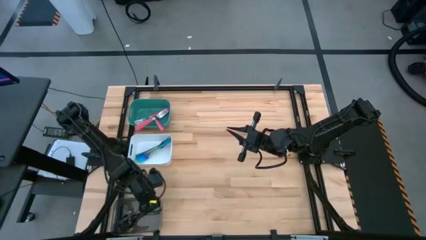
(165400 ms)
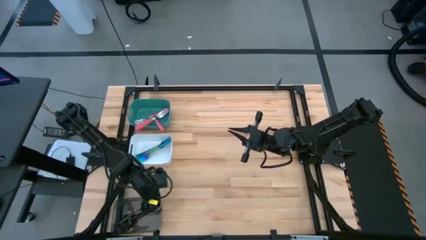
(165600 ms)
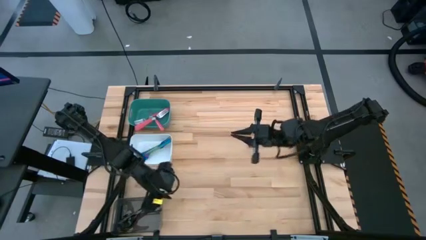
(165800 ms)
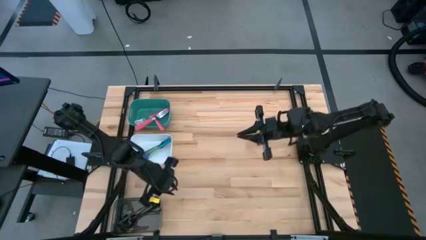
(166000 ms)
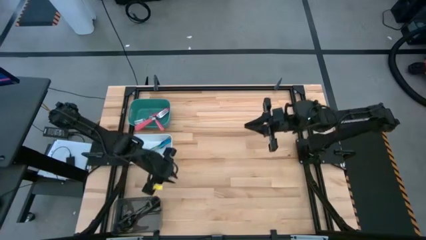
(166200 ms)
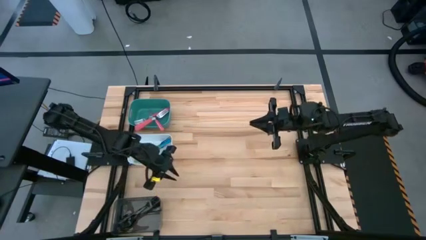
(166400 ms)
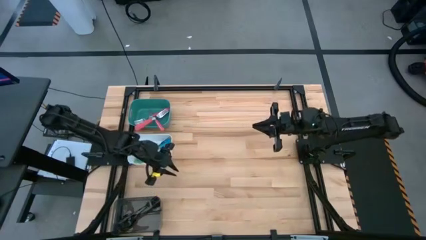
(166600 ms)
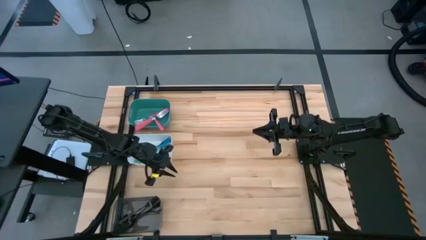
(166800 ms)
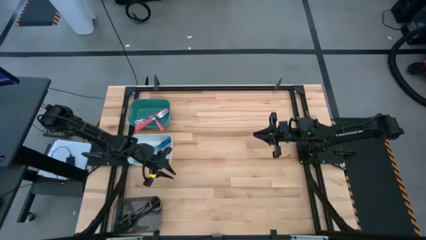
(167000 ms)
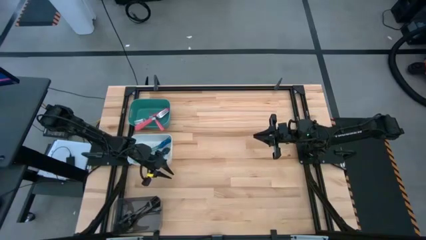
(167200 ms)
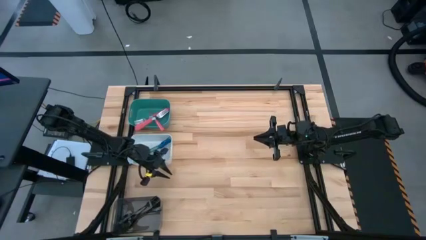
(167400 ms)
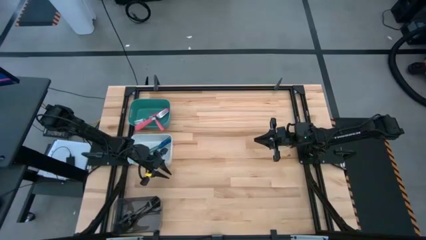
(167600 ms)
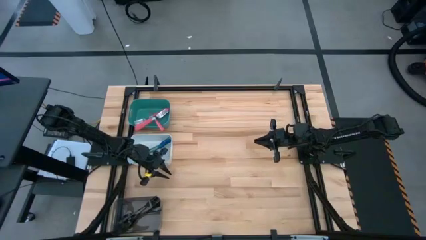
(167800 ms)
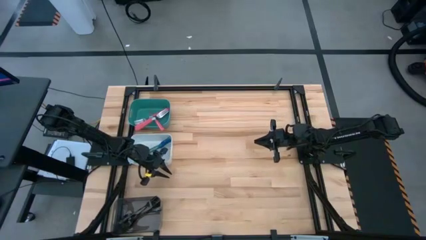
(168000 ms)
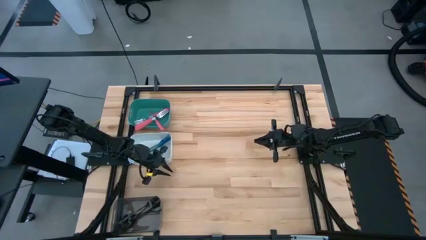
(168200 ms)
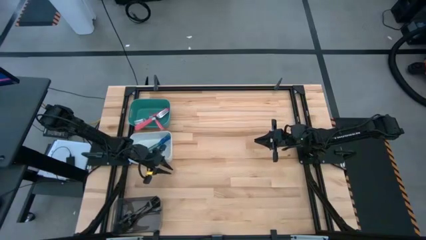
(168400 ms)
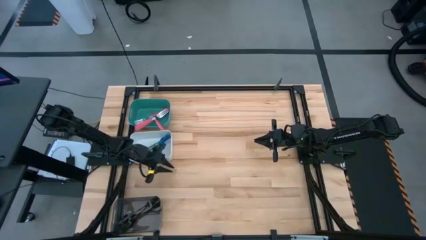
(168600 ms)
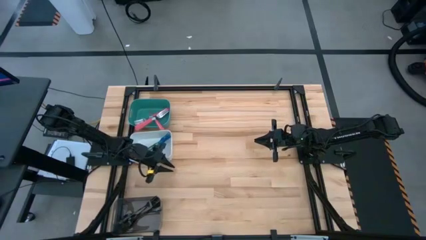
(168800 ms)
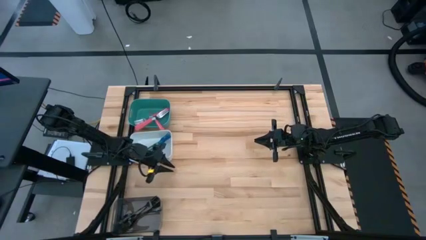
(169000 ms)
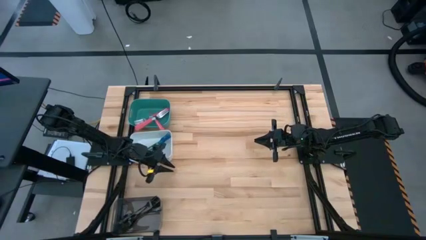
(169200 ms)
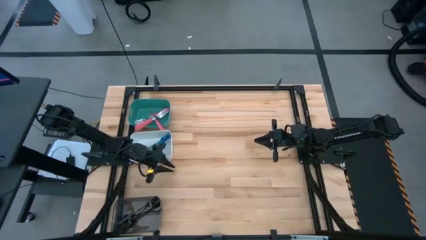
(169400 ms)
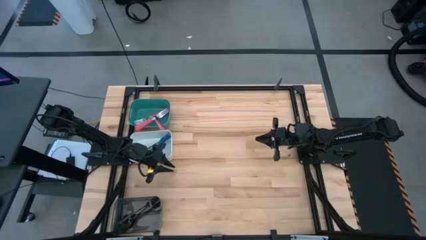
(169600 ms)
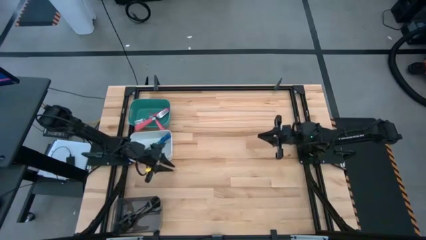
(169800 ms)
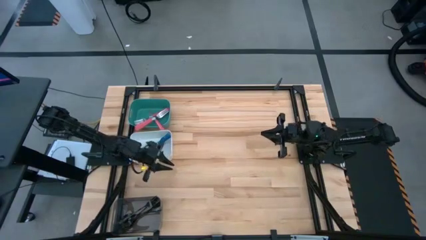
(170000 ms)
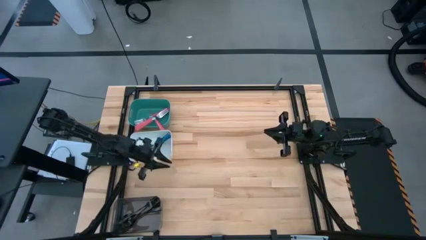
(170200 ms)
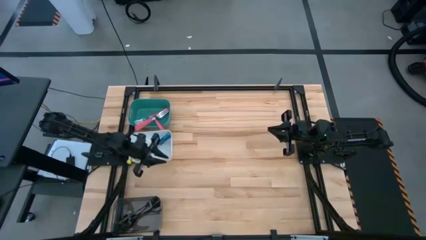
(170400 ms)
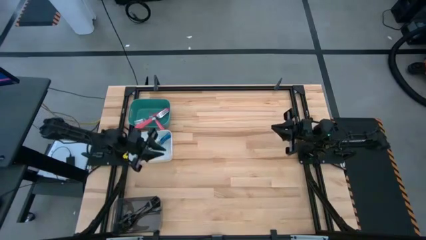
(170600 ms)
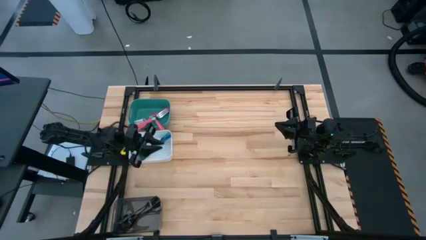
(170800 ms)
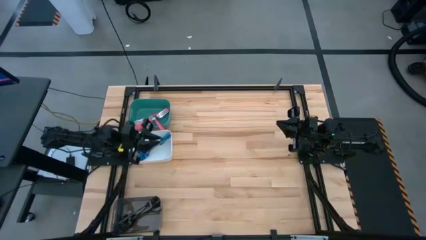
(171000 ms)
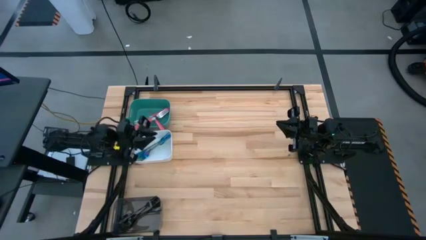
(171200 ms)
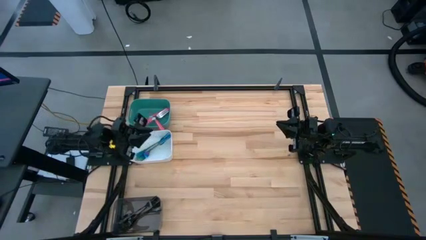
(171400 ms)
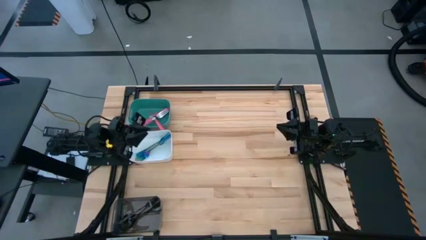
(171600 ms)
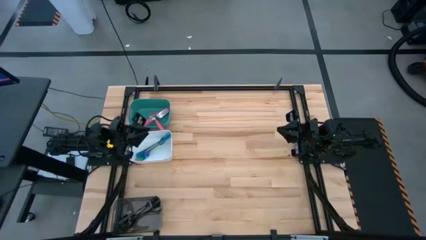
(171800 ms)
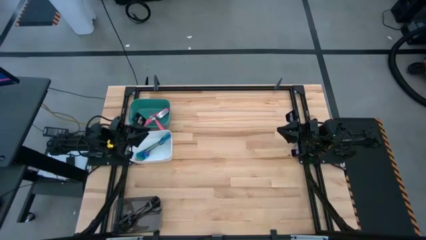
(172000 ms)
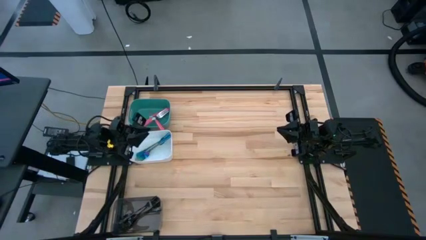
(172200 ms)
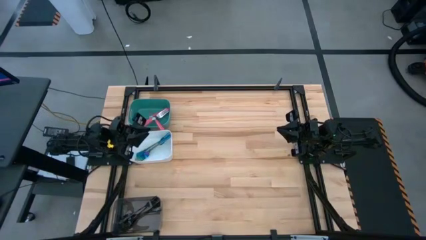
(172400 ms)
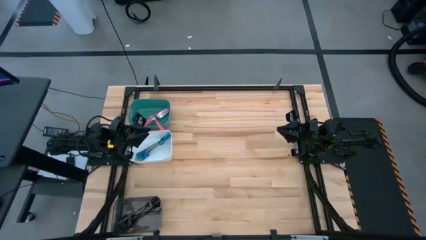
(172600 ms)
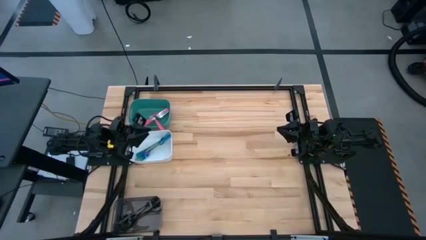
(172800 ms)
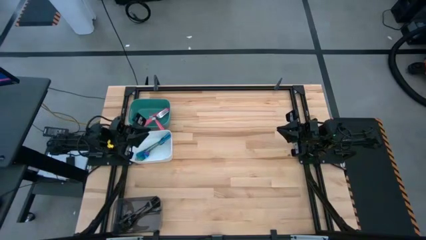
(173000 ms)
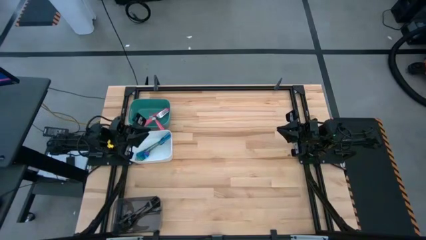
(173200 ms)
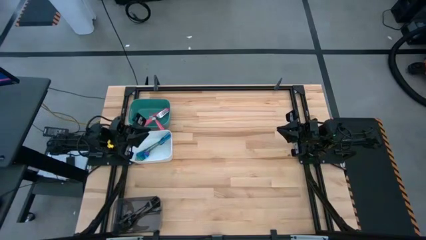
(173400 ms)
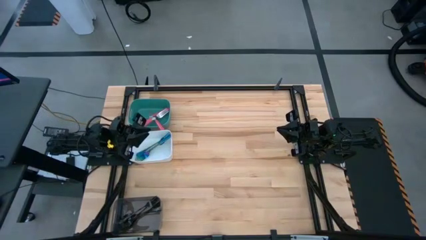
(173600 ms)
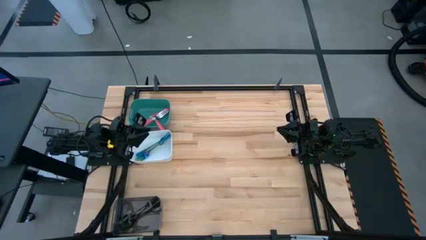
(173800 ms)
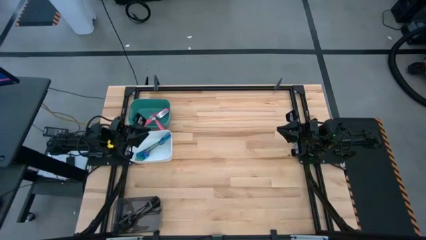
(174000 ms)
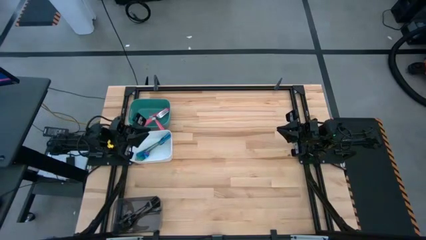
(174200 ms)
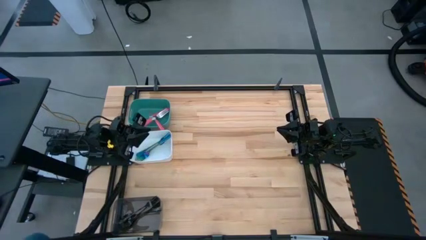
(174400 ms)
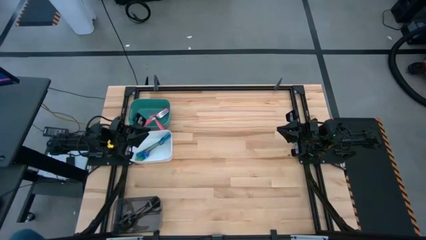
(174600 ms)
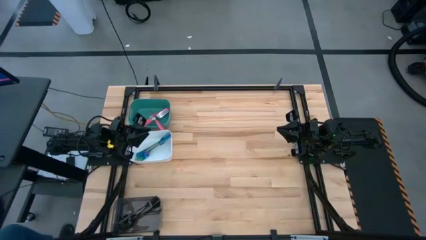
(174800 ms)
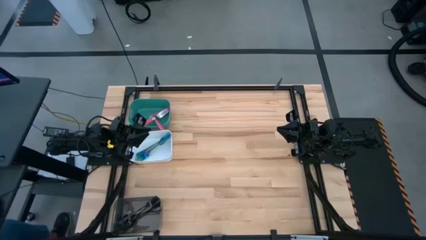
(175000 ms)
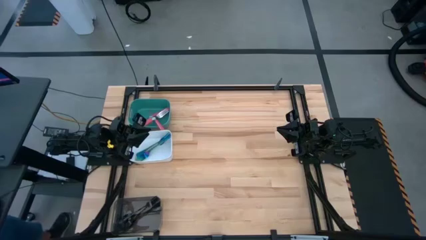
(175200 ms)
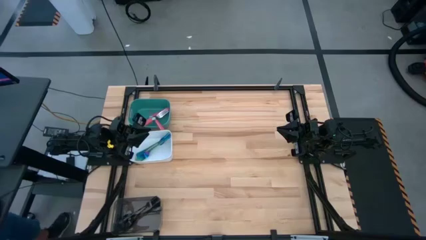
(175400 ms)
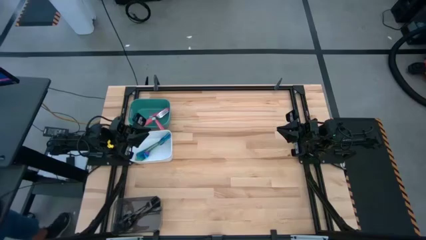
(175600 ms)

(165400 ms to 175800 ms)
Task: Sort silverware by color (type)
Return to Home Position

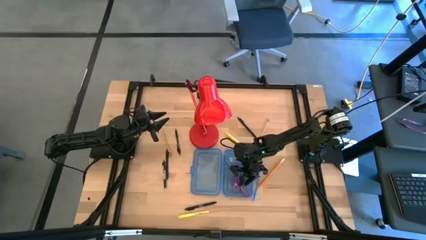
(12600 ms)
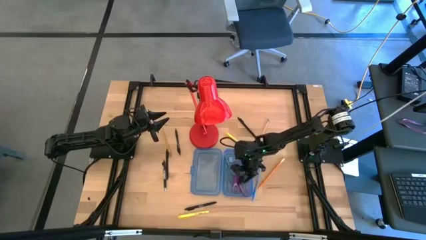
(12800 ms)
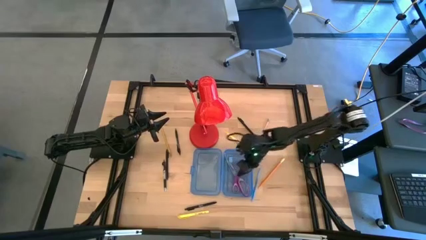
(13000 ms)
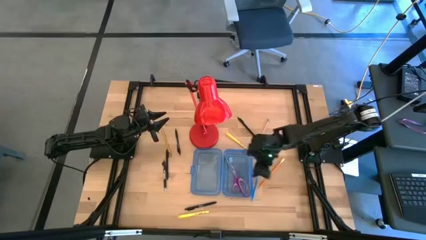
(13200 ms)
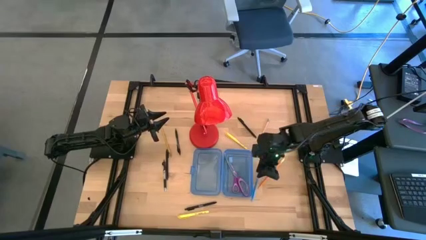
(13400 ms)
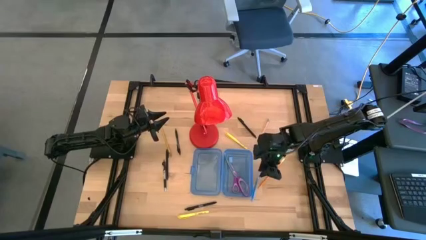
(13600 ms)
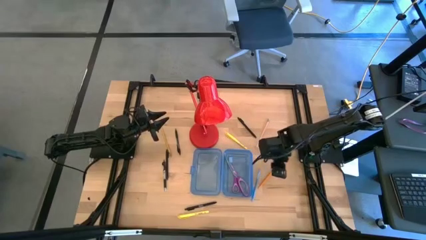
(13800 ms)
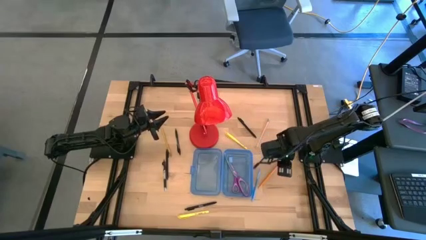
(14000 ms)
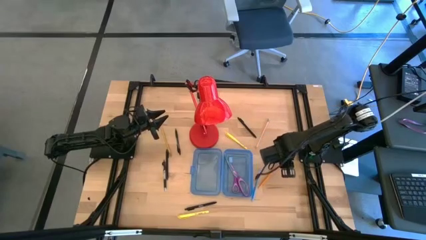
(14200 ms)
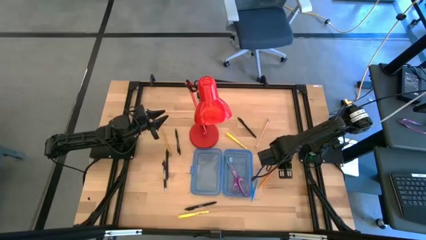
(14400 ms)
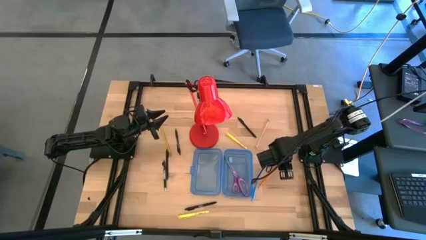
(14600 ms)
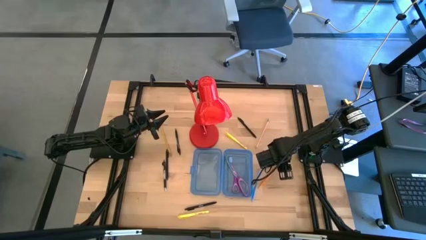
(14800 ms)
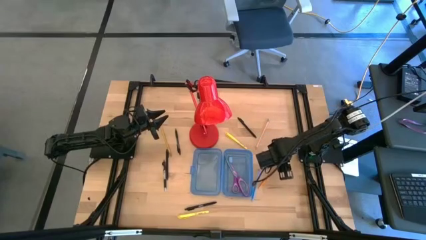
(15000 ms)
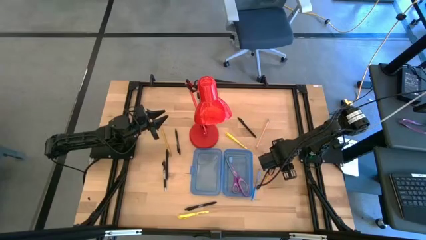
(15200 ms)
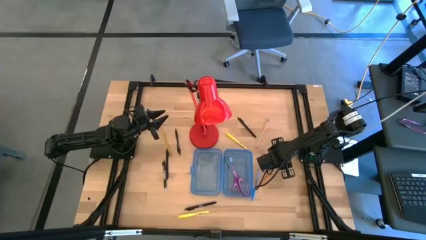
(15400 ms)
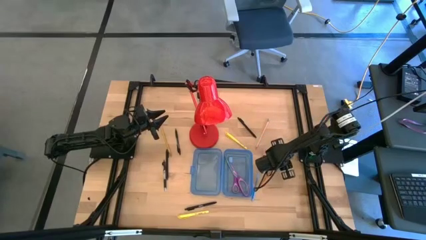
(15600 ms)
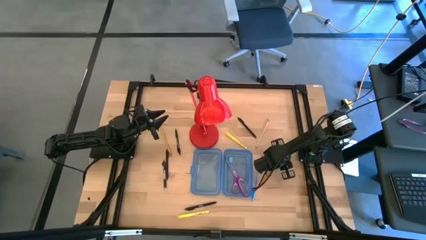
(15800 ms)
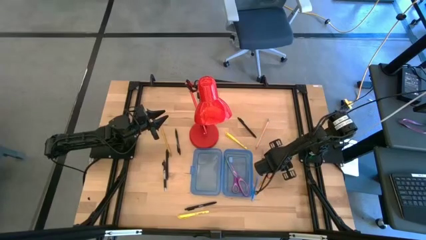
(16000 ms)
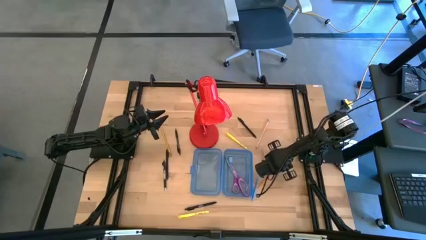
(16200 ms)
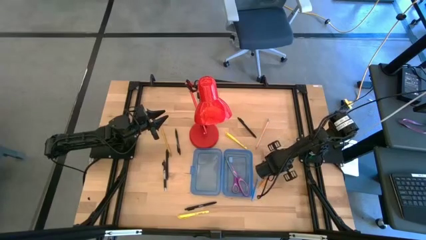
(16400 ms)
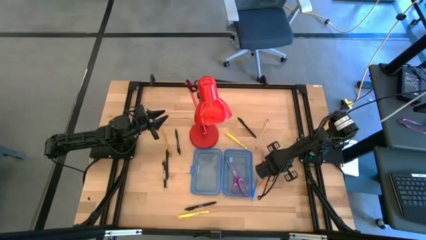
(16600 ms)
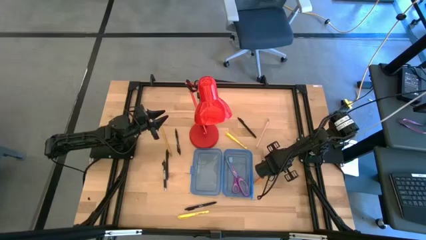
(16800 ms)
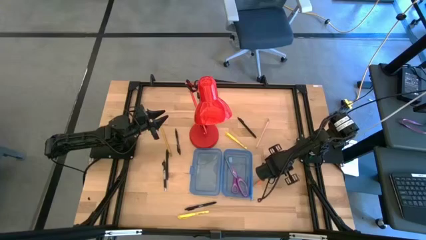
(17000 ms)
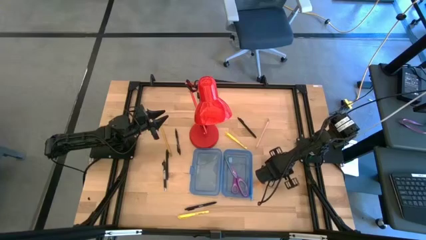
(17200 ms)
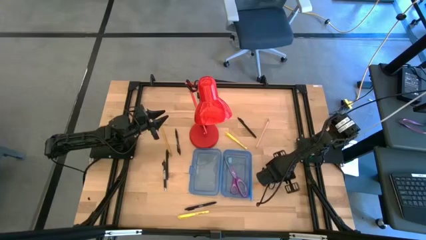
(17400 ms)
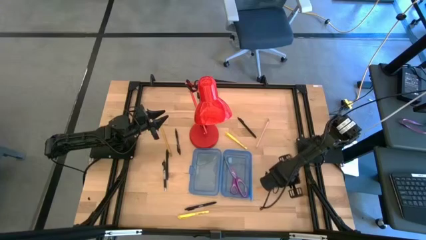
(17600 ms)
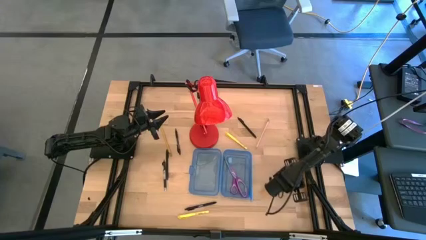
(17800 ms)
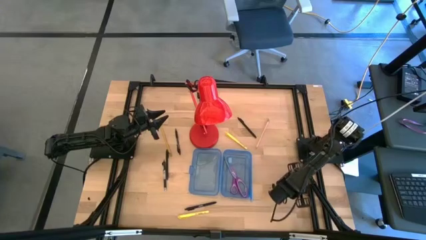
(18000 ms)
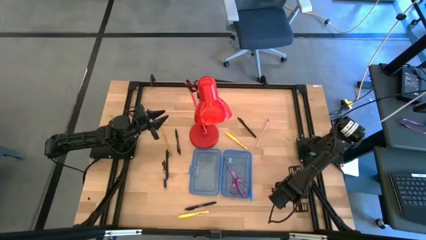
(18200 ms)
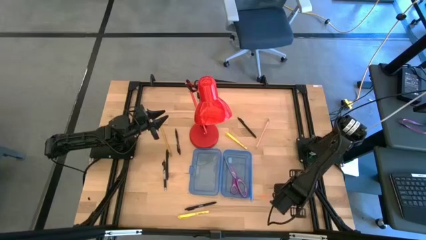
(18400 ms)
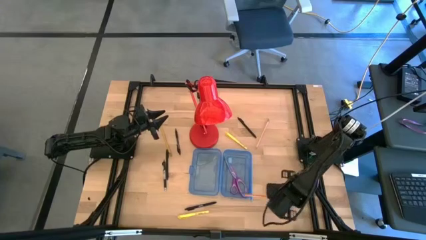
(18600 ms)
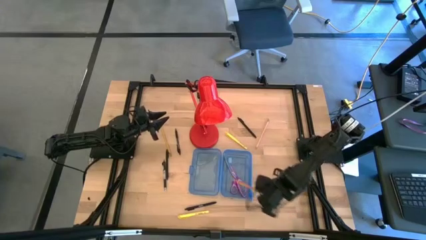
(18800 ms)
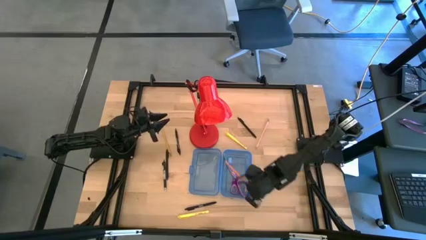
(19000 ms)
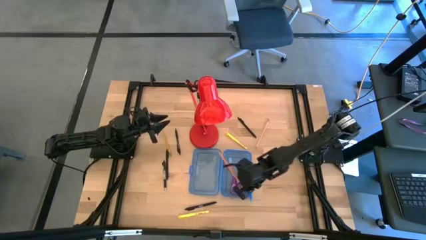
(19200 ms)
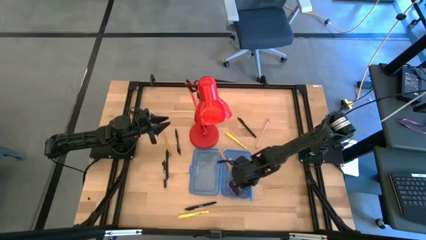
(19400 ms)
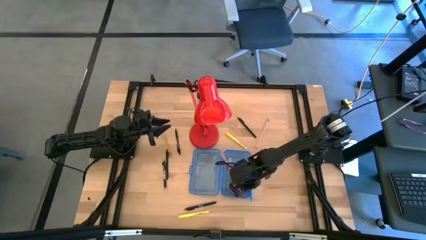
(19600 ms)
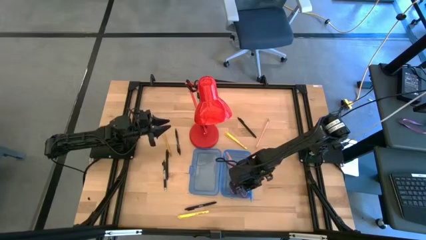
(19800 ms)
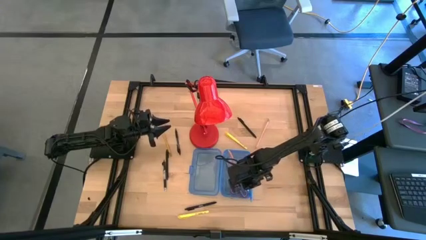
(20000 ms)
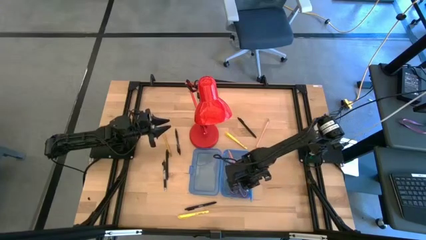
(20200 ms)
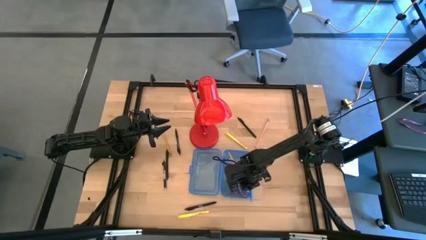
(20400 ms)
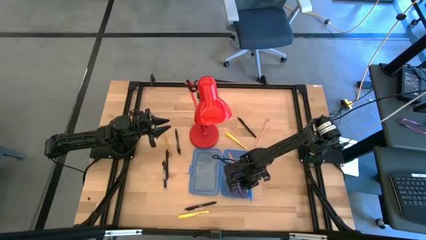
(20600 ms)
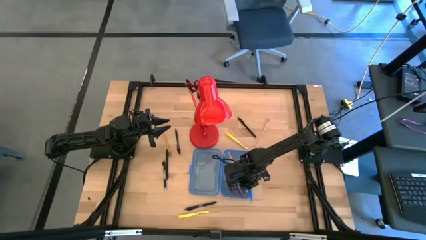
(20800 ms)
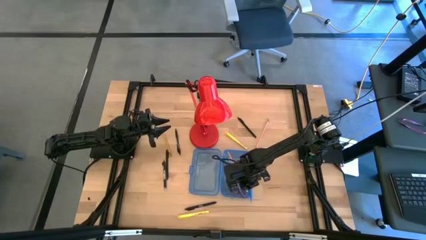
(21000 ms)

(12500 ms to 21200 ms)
Task: Pick & place school supplies into a supply box
Put the orange pencil into the blue supply box
